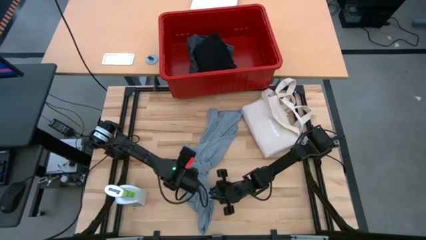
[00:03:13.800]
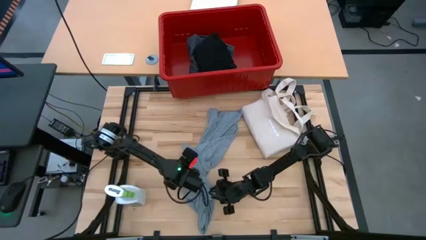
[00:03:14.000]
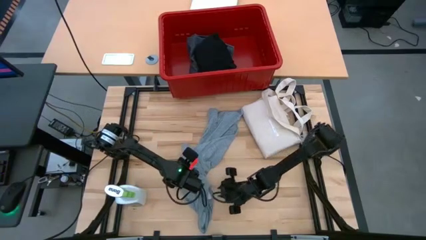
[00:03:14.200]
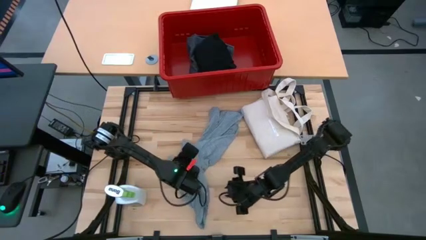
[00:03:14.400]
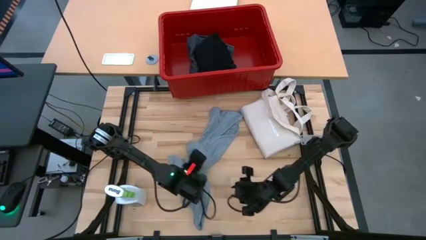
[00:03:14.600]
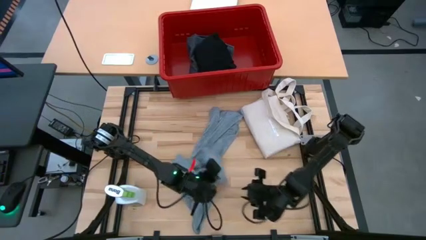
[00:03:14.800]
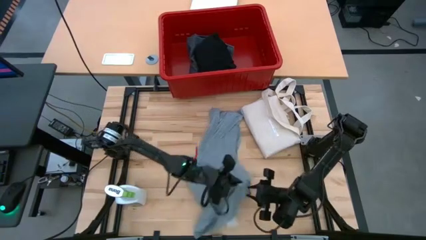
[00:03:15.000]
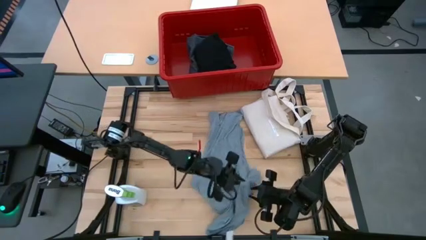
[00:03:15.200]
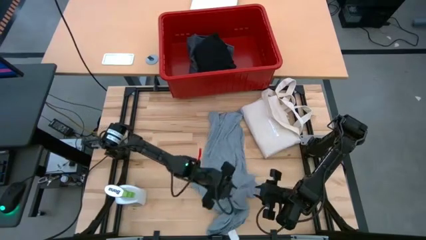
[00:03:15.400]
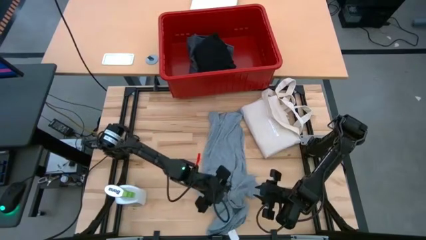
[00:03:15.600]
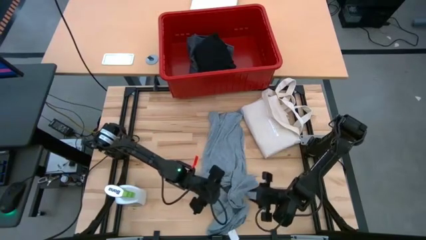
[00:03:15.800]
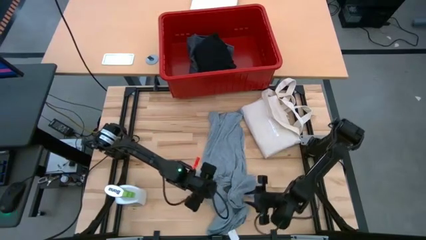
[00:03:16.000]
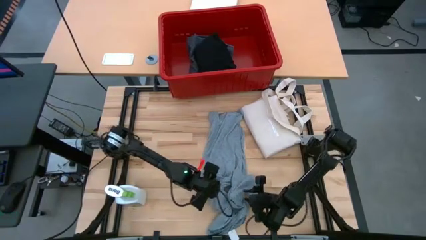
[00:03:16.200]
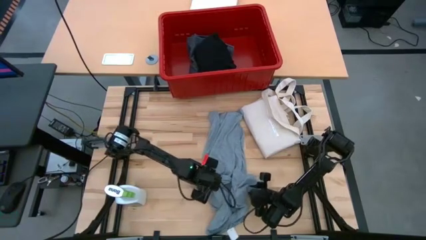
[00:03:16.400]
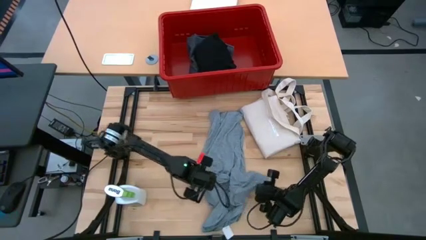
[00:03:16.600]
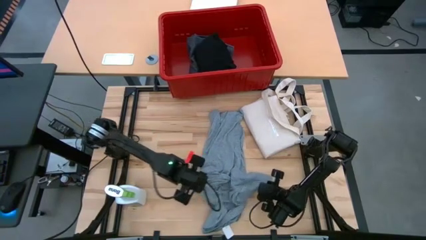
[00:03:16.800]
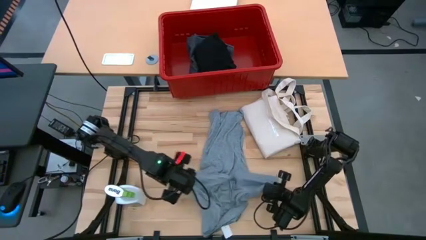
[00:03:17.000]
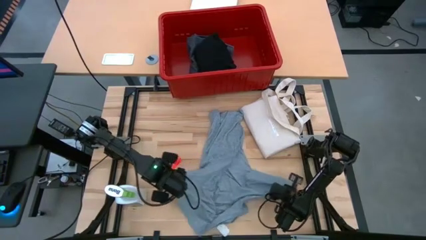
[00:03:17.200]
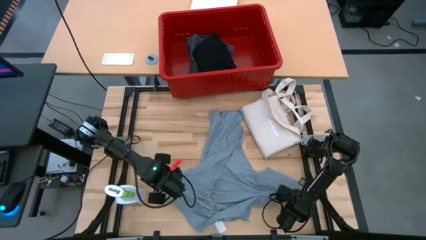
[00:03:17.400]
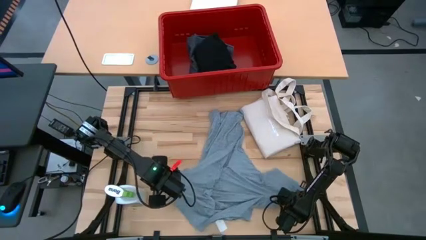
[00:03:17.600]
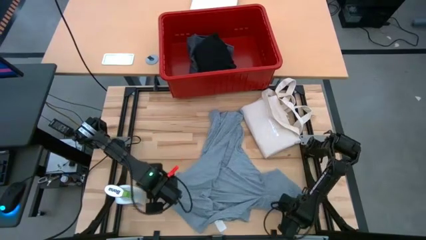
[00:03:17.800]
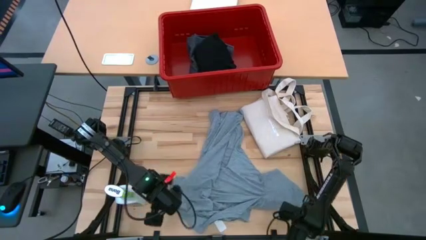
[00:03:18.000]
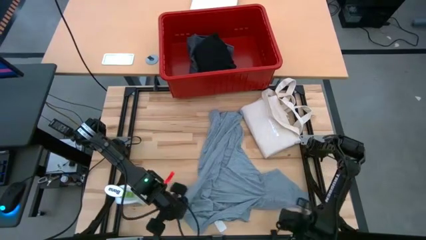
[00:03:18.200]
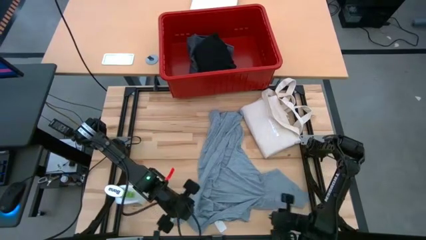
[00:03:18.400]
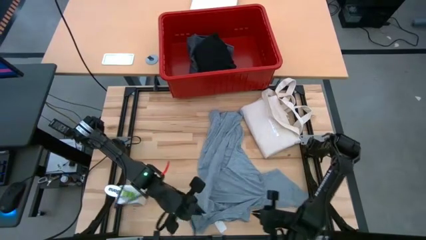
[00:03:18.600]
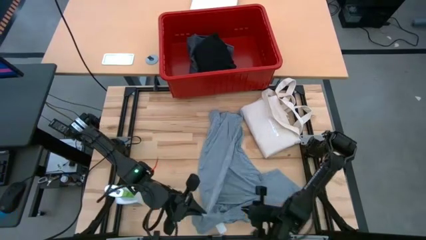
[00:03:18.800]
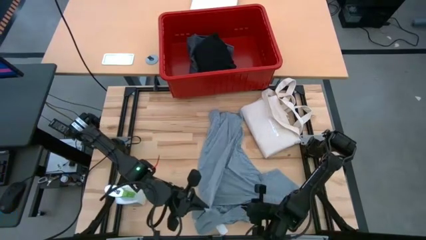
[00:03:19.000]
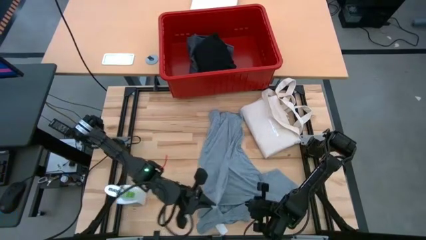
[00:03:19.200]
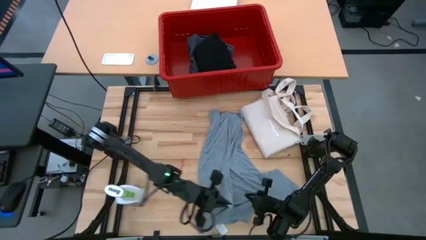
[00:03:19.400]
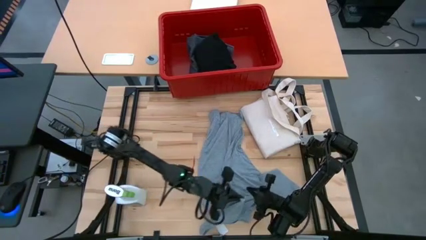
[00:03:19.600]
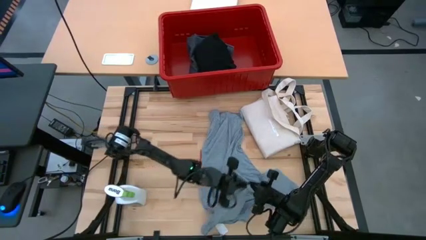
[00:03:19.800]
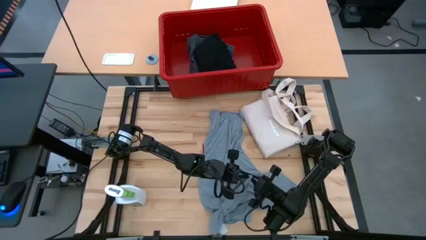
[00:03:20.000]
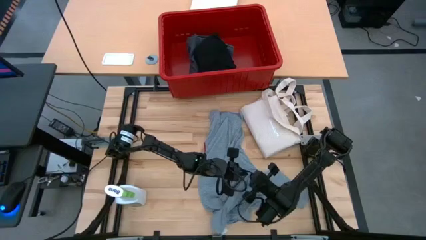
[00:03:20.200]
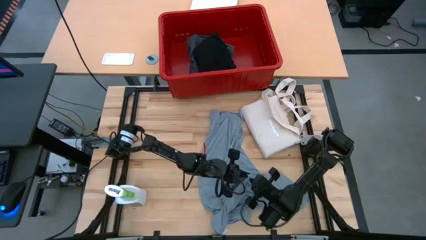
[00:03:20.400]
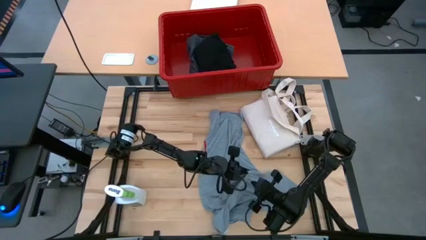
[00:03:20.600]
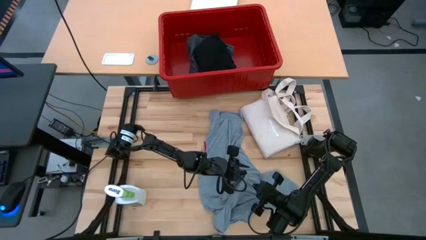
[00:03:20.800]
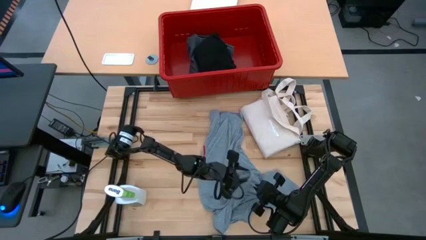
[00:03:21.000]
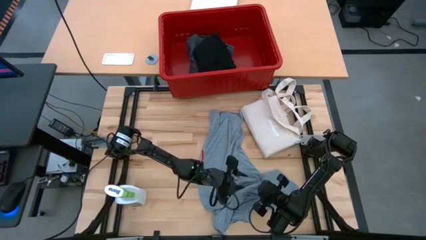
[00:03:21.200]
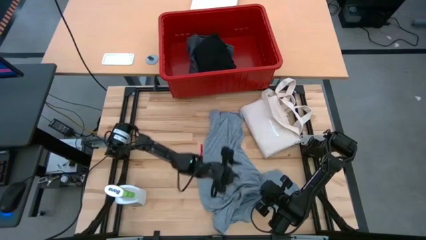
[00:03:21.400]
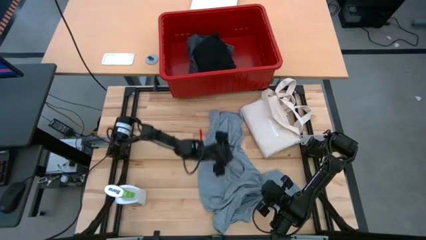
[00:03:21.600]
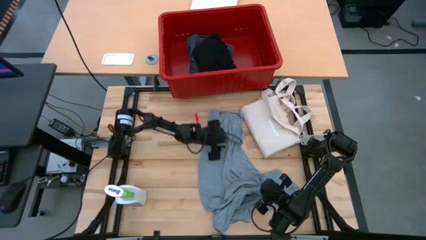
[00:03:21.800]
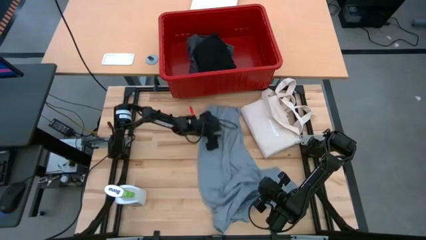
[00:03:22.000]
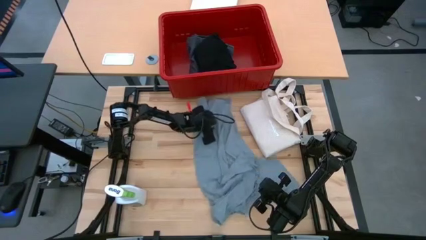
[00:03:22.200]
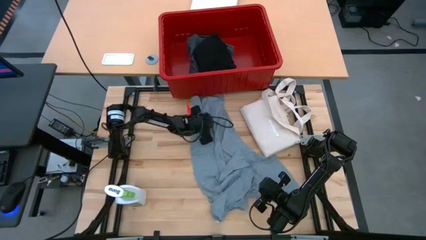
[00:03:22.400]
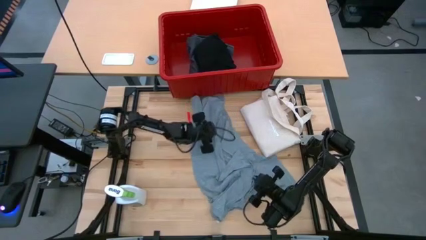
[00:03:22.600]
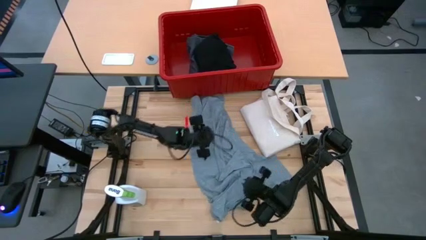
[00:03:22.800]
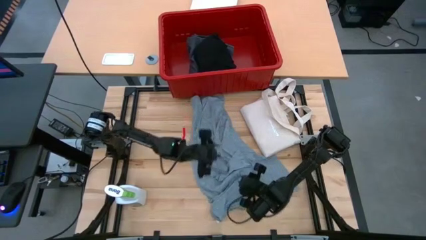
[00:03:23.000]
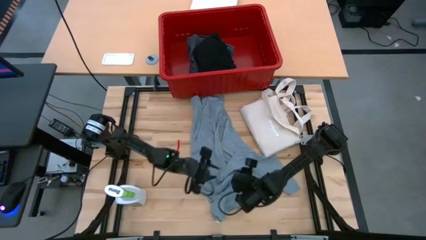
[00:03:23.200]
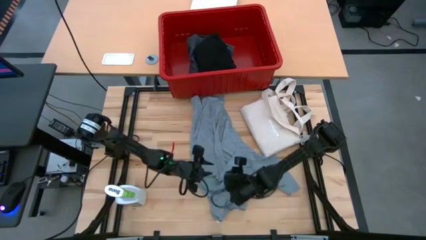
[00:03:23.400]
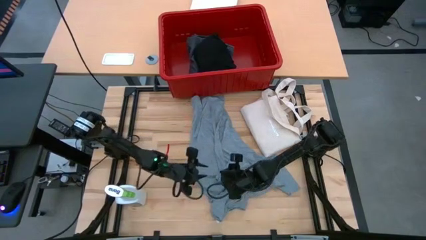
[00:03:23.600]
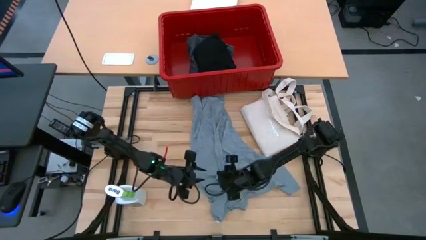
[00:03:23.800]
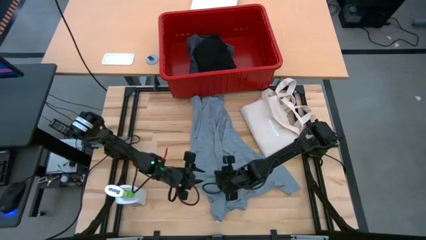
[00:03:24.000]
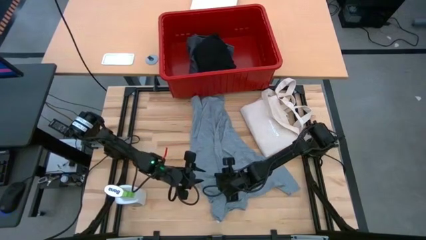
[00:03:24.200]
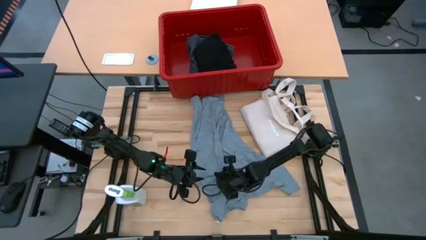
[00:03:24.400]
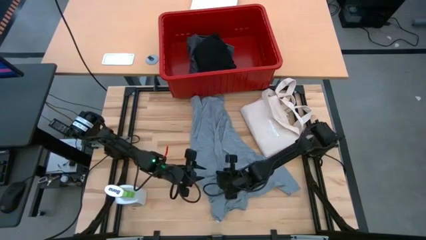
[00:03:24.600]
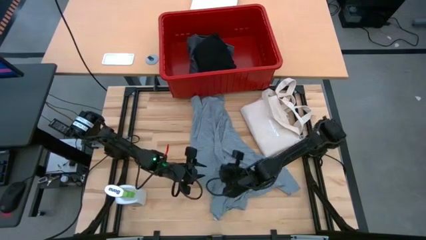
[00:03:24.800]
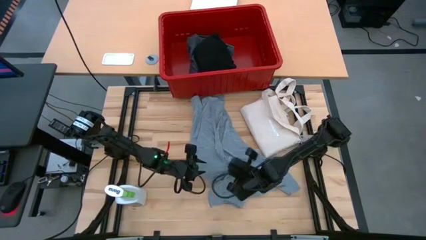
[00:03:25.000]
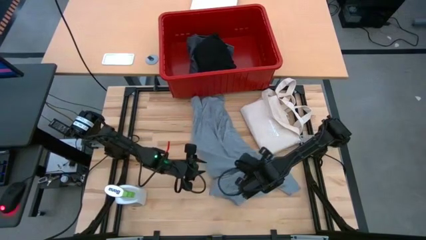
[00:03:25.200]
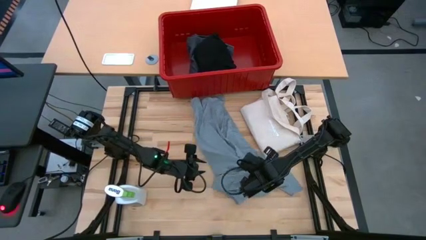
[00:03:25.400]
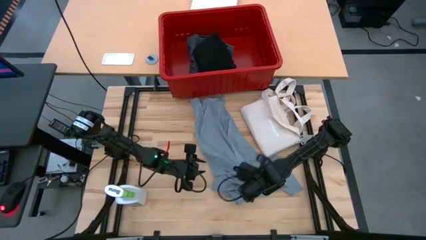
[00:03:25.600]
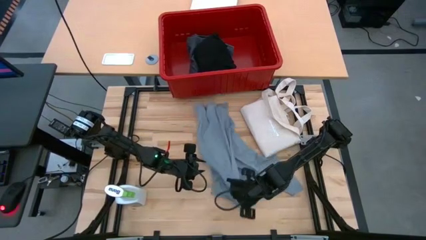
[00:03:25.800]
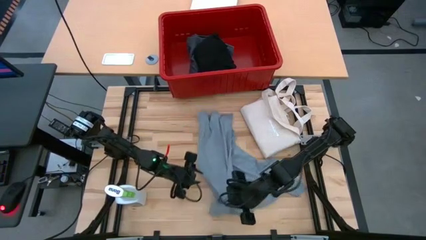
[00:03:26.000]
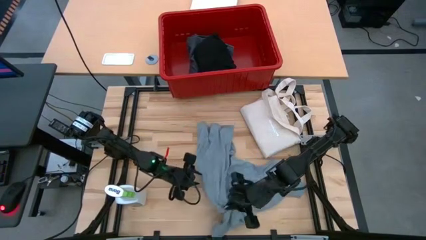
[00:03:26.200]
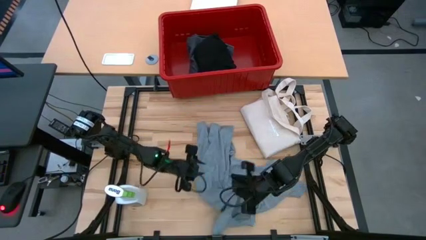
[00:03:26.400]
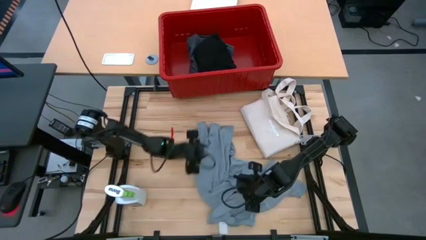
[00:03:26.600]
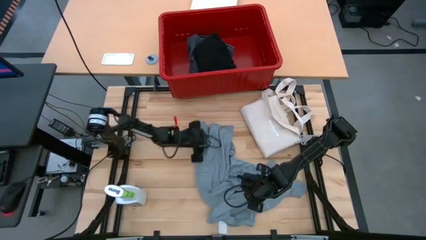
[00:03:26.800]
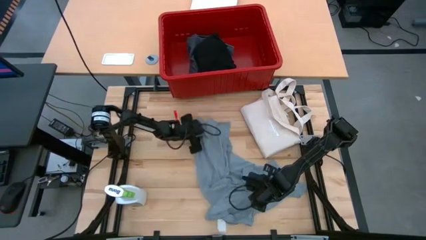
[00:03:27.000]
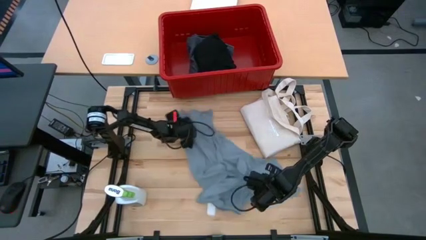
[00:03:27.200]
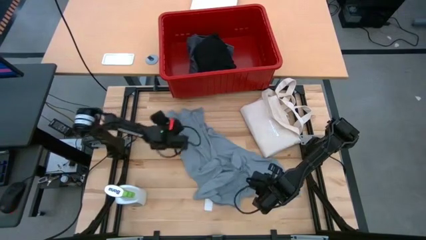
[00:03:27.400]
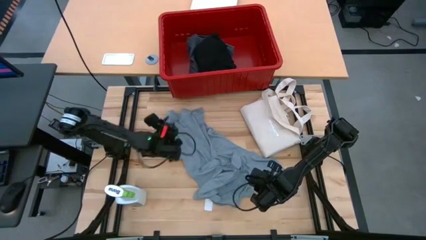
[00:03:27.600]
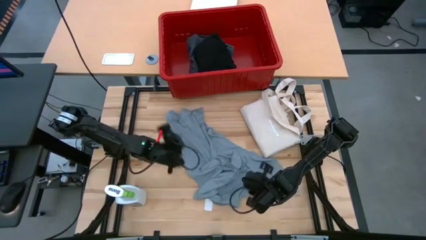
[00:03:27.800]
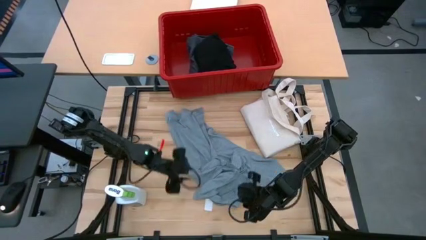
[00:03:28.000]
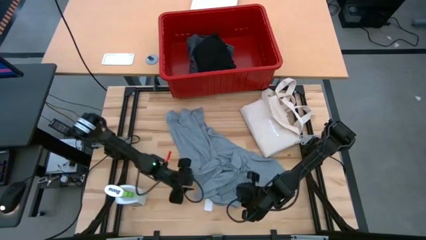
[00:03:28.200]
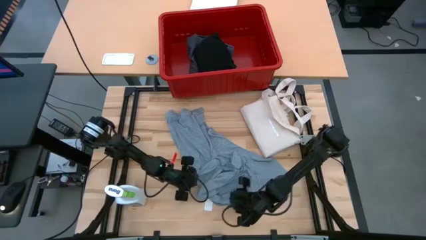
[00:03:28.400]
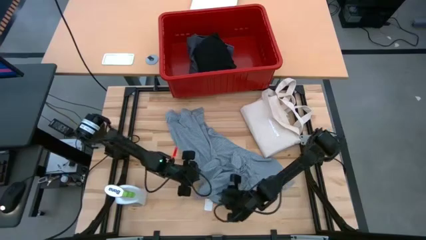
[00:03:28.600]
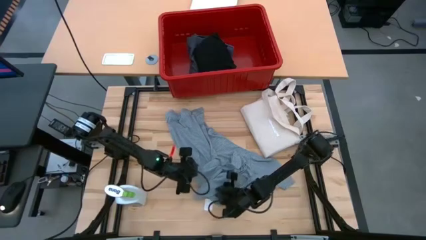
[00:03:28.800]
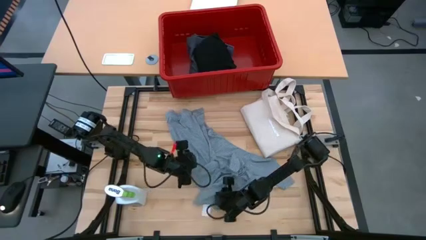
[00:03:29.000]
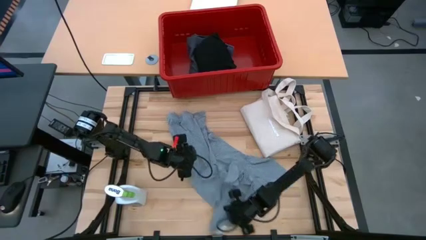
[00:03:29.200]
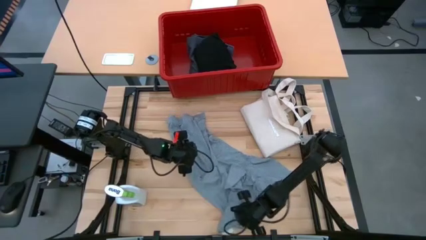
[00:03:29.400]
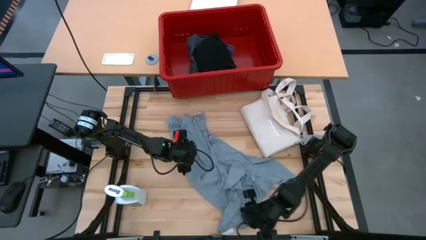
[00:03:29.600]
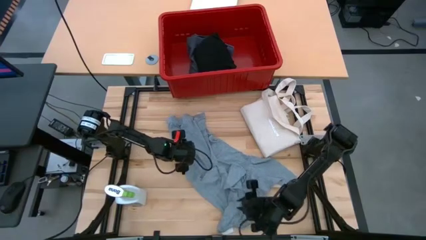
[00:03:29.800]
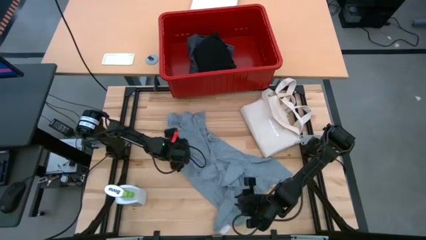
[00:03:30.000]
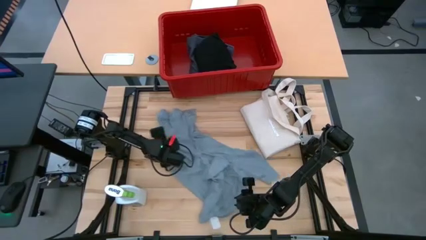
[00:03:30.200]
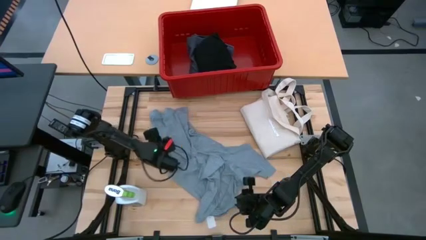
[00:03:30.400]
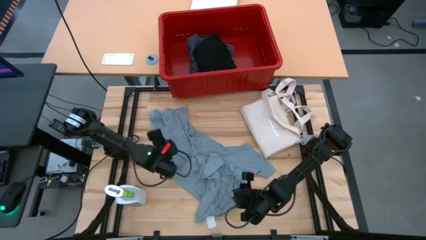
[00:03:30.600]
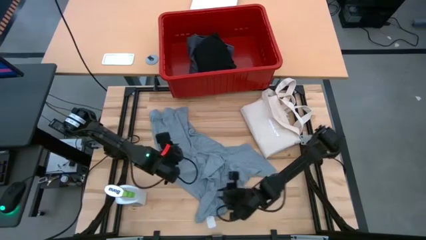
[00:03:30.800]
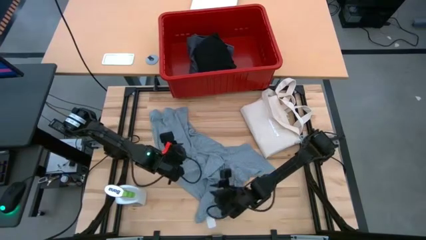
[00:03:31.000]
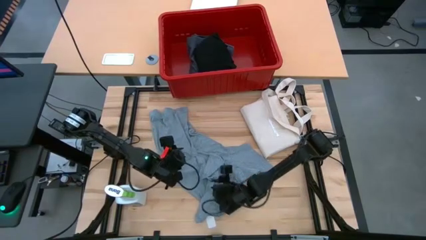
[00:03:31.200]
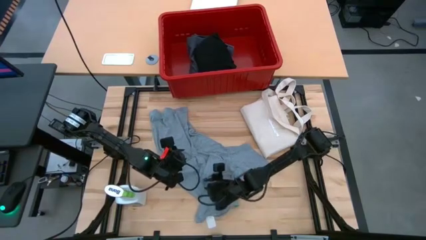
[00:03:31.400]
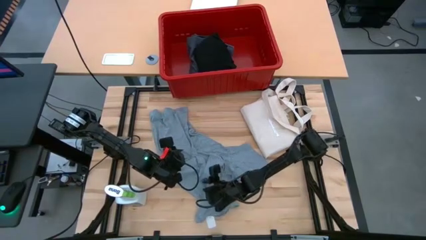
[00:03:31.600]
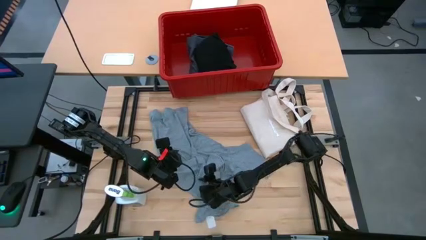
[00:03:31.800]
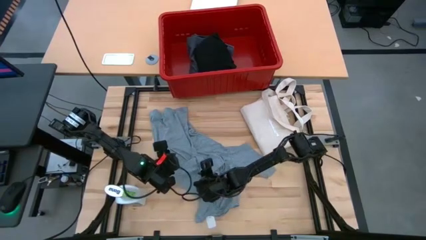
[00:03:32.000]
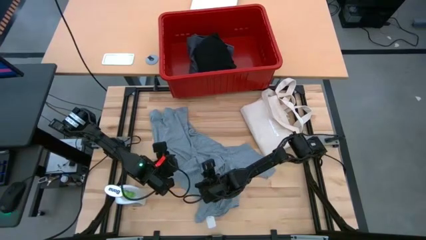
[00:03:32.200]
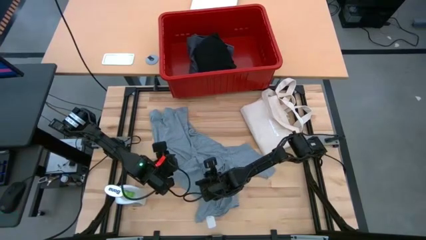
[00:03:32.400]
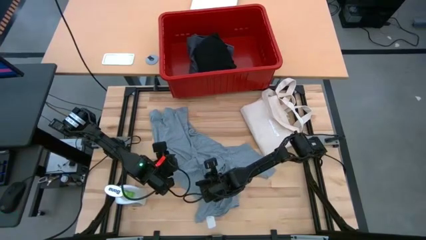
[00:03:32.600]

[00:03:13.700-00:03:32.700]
Task: Fold Laundry from Bin
Fold the gray shirt
